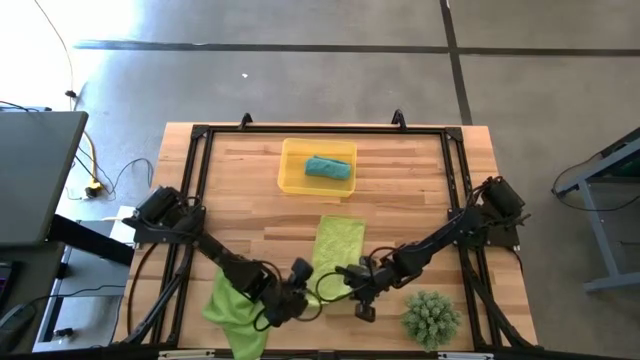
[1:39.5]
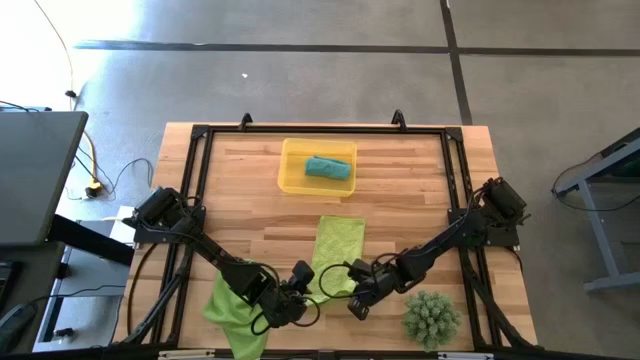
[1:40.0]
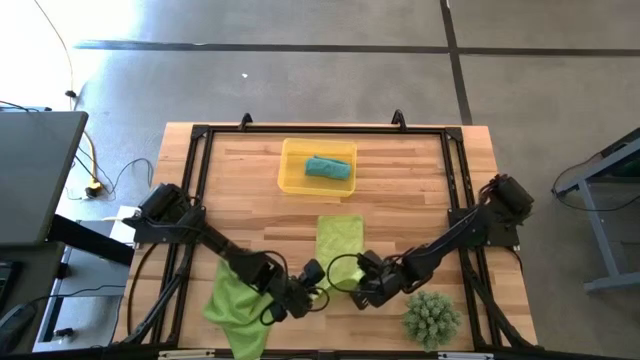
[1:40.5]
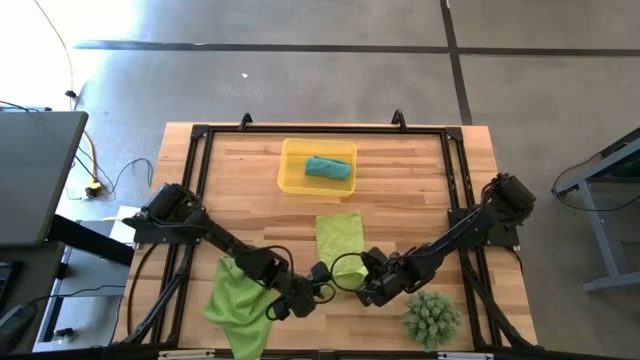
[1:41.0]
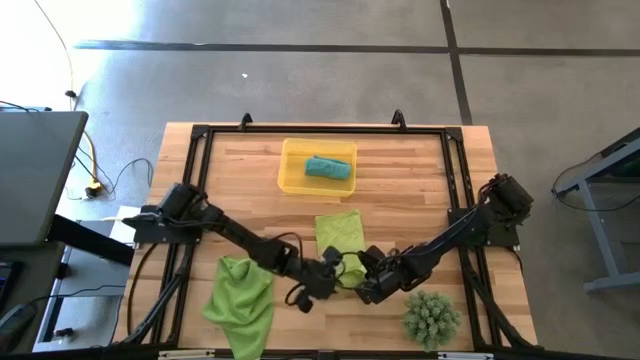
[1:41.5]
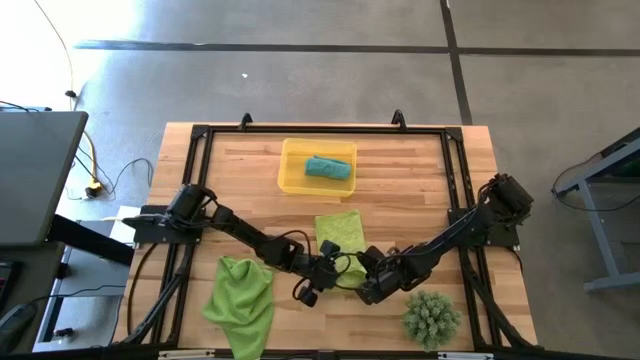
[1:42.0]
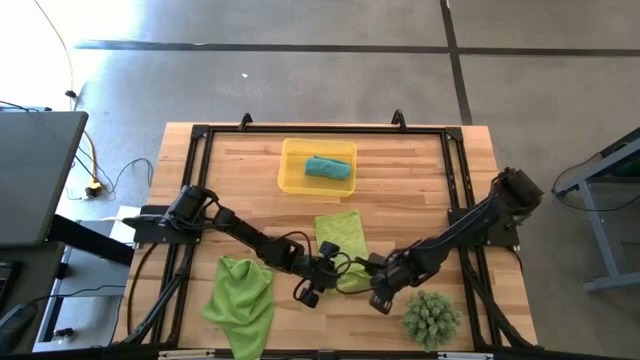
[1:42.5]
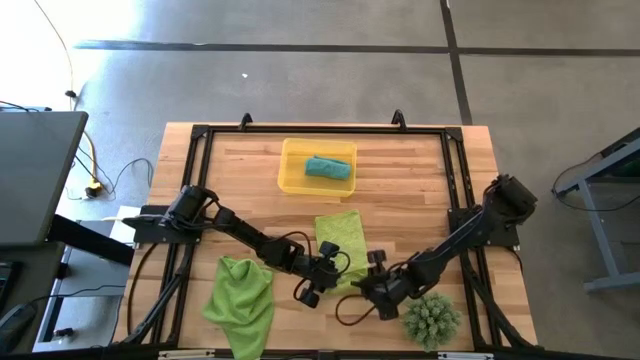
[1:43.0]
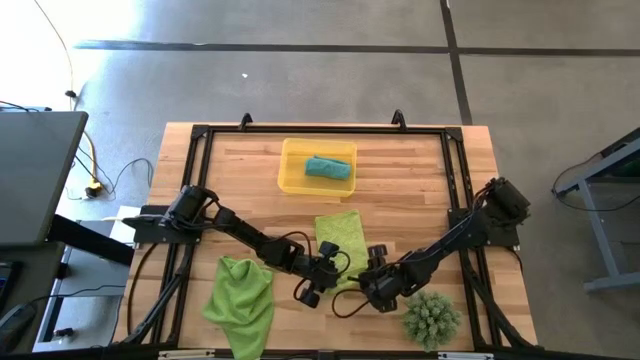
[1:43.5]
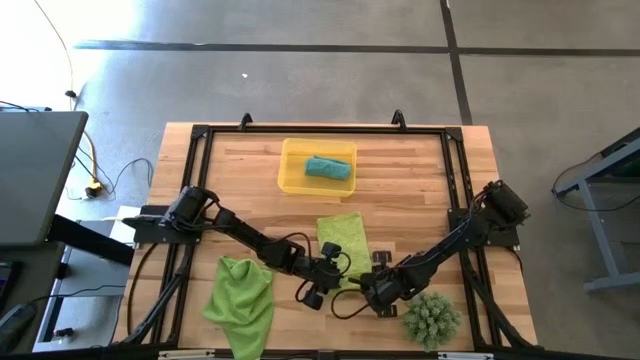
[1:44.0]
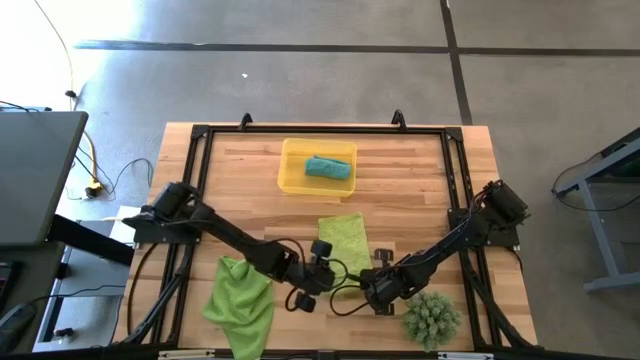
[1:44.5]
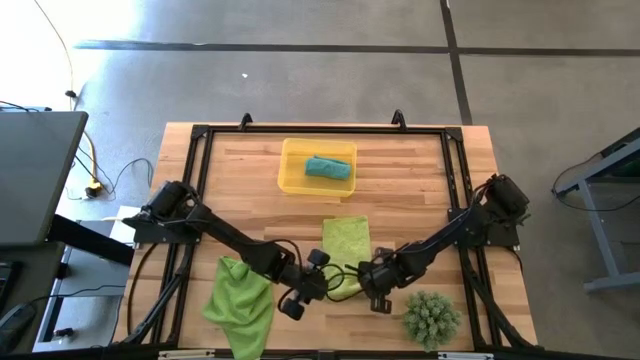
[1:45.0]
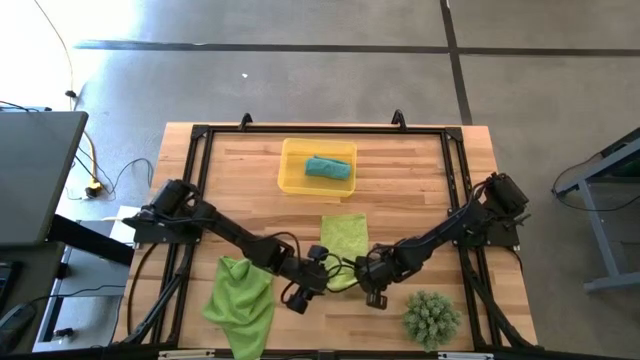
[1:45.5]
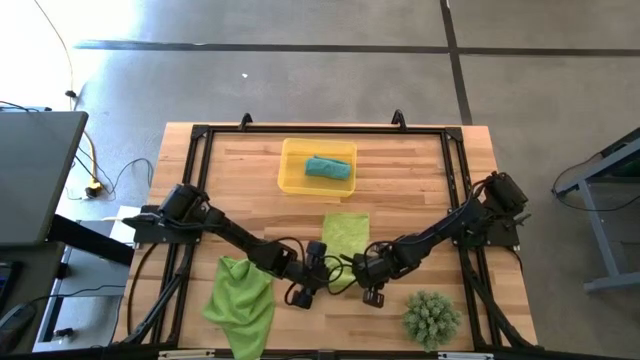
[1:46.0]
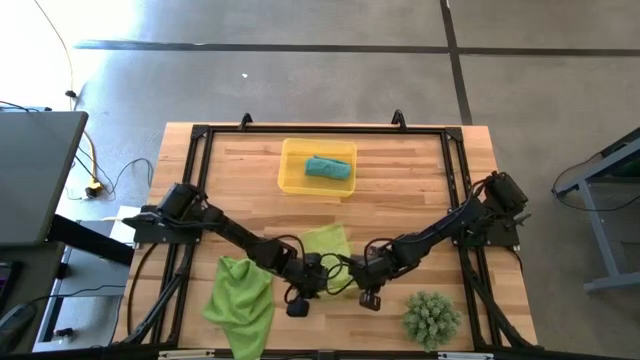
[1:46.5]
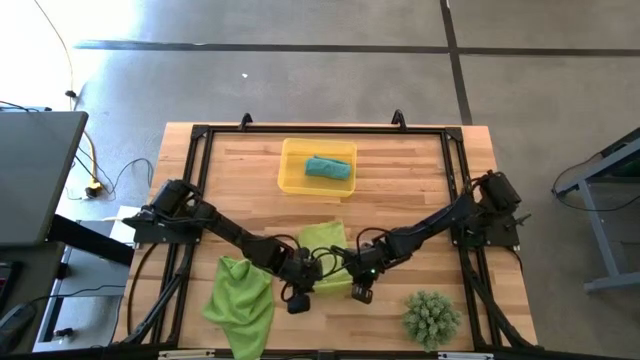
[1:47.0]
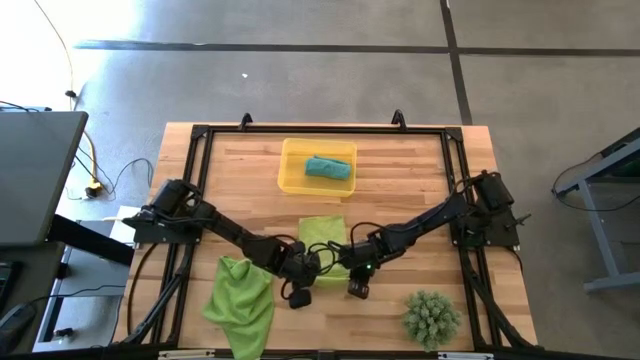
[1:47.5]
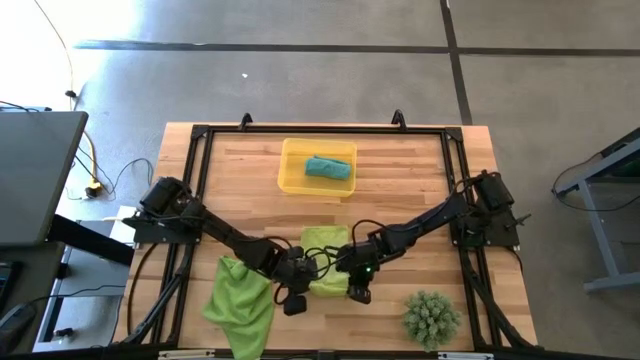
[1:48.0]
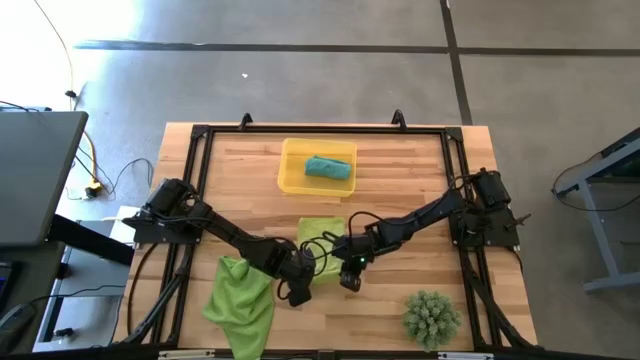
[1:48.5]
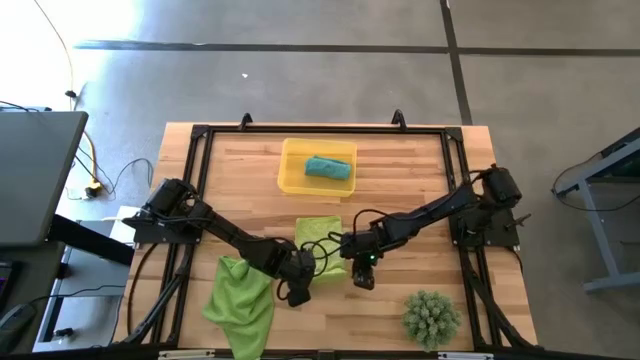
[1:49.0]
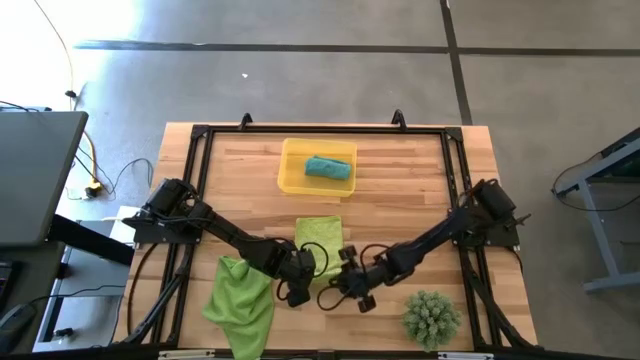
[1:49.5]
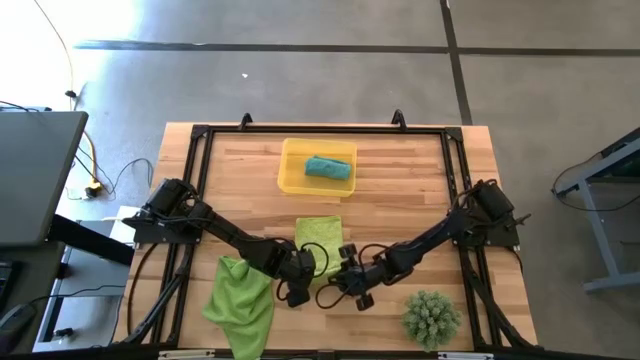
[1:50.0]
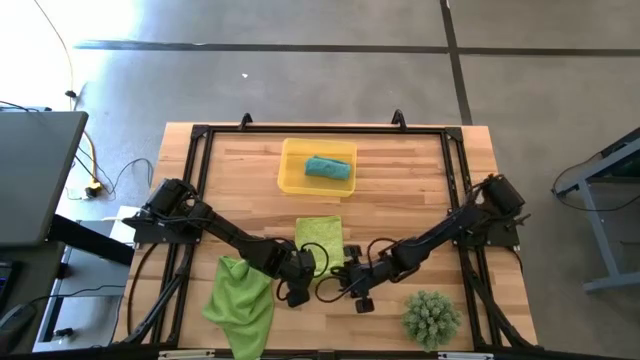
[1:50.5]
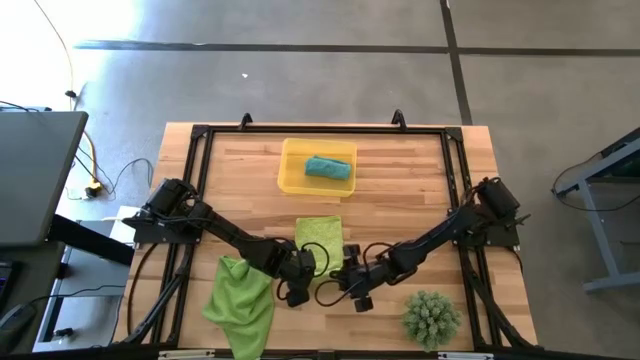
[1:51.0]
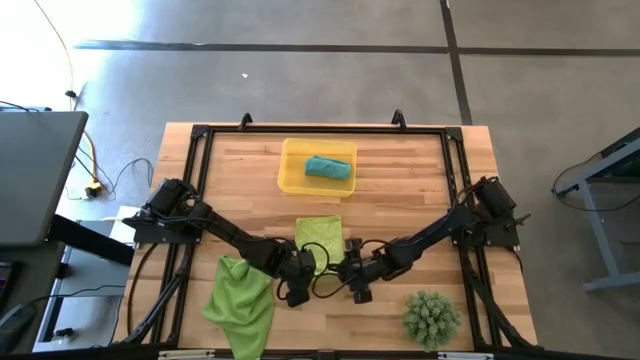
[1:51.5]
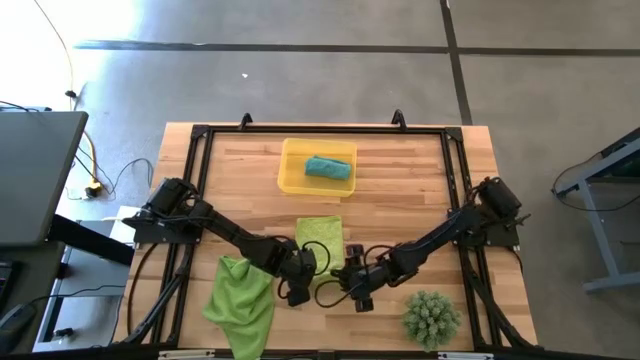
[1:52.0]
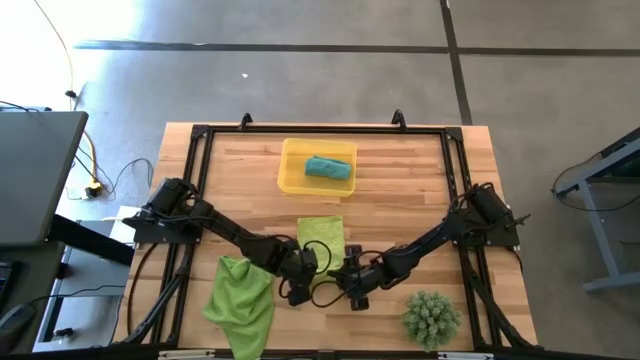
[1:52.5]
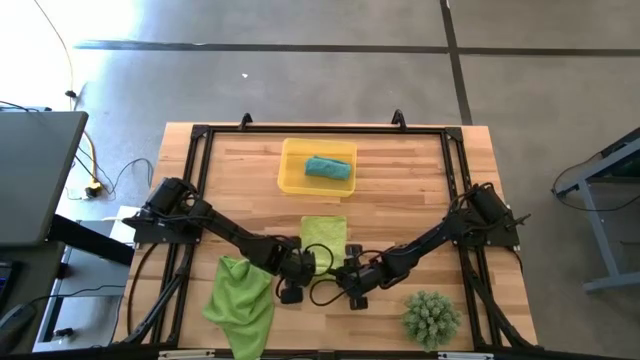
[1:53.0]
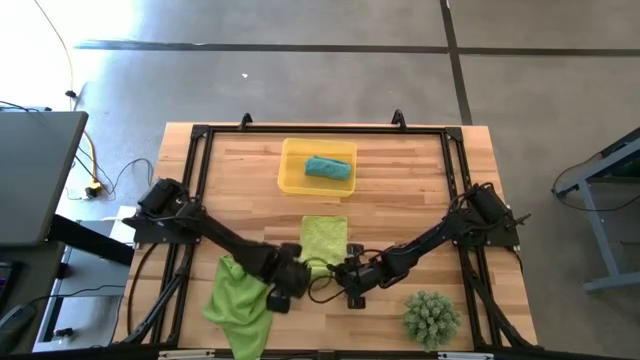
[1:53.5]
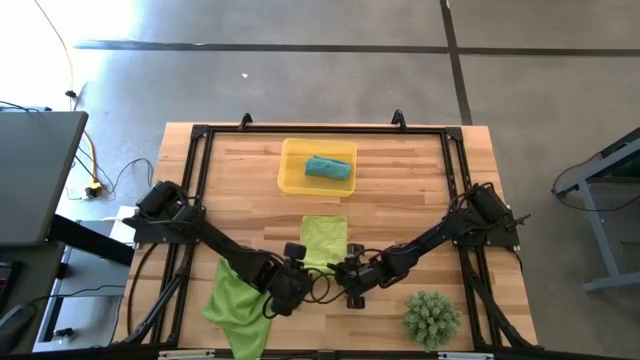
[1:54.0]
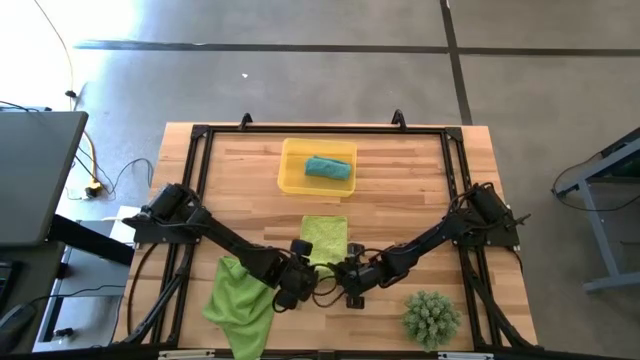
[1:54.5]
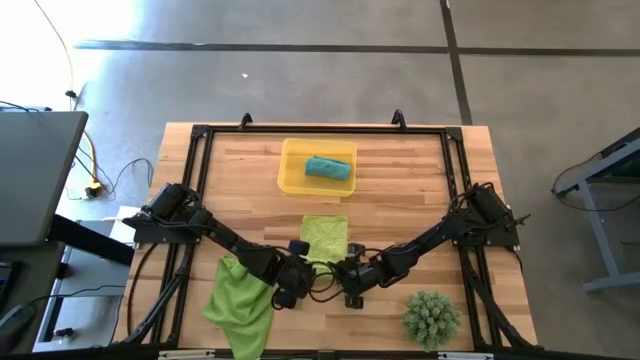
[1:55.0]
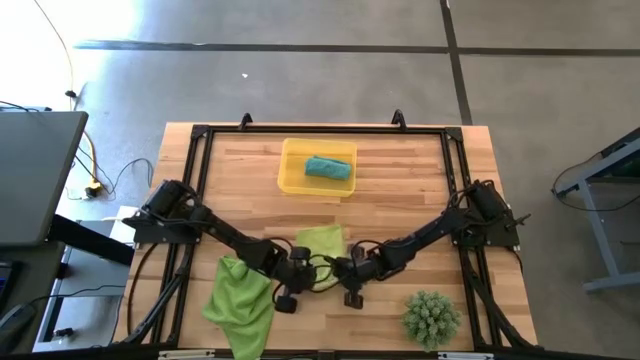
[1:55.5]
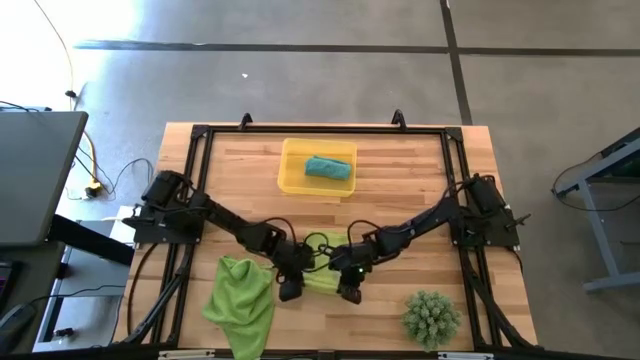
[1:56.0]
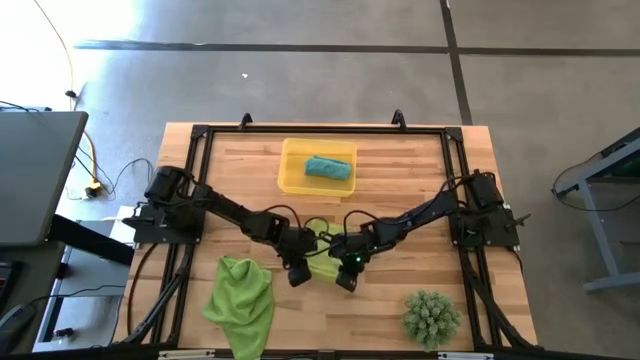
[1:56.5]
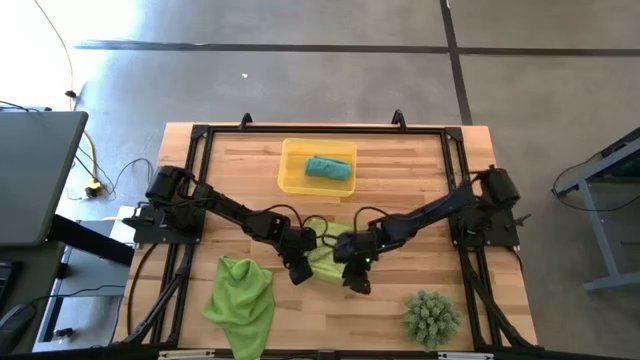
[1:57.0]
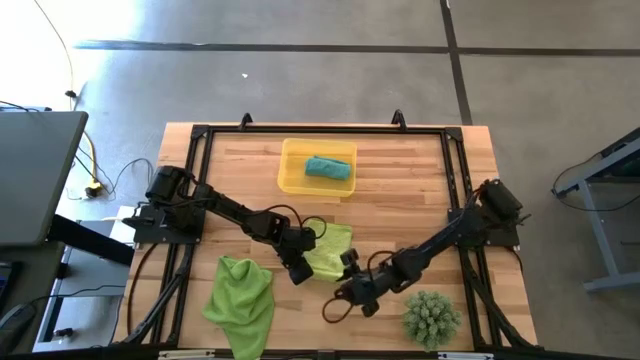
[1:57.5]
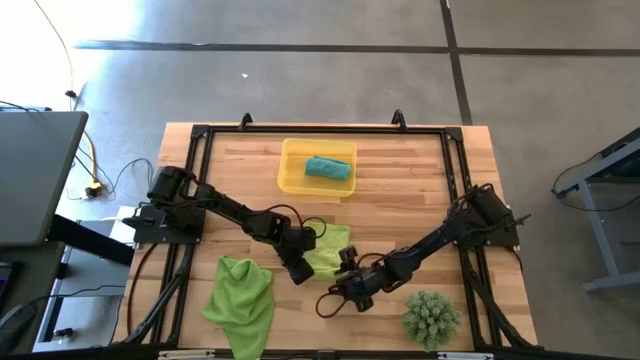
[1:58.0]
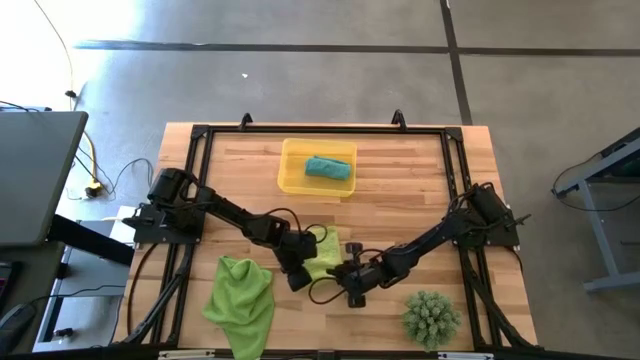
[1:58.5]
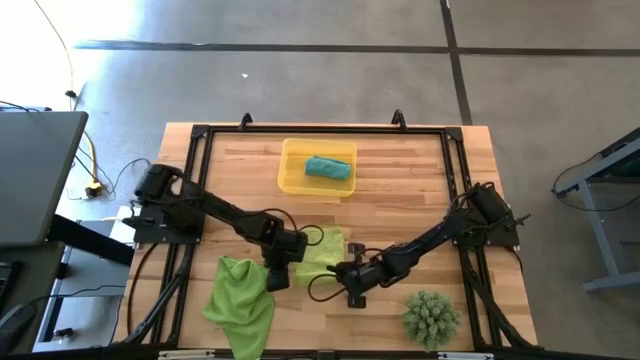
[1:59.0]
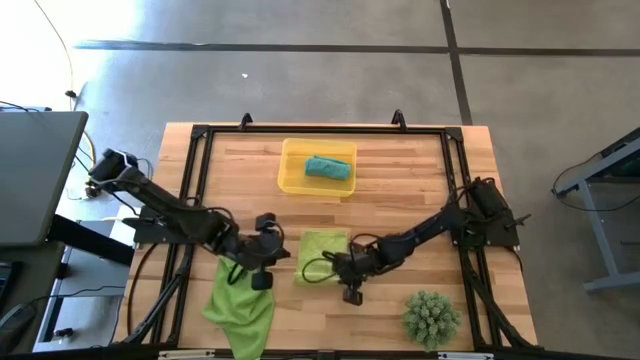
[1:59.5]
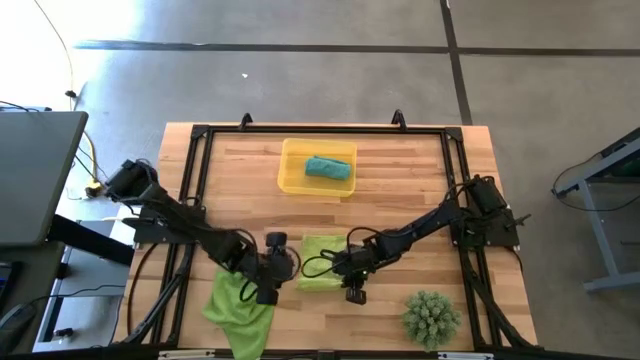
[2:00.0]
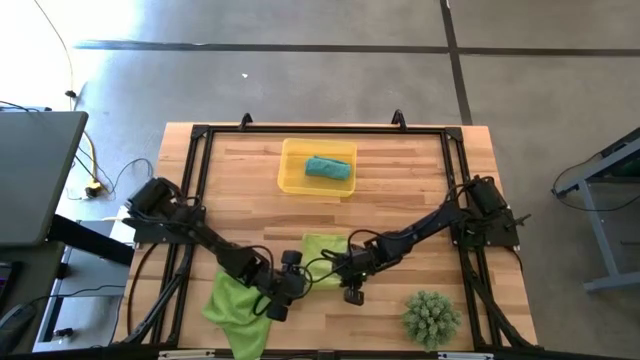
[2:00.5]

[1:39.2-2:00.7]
Task: Roll microfiber towels into tight, uniform cylinder then place into a basket
Roll the light green microfiber towel
